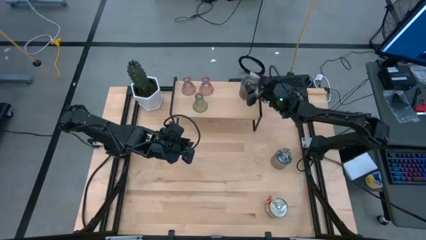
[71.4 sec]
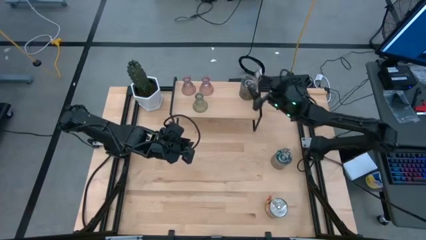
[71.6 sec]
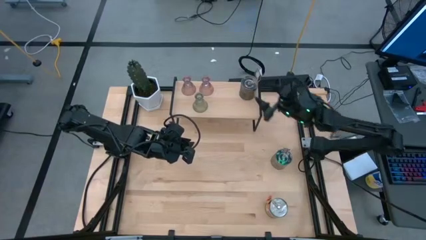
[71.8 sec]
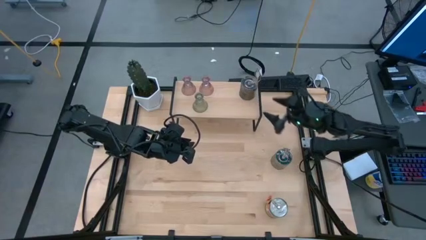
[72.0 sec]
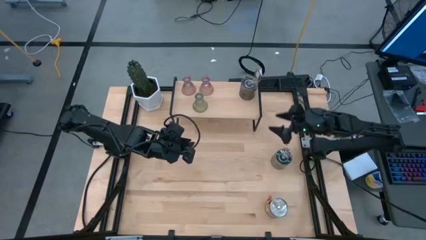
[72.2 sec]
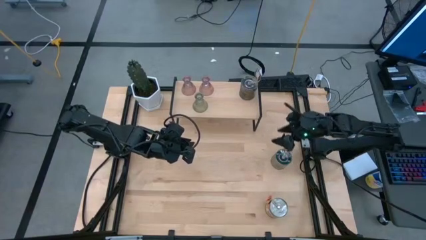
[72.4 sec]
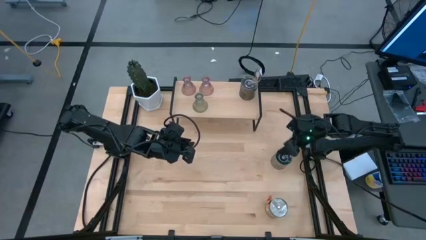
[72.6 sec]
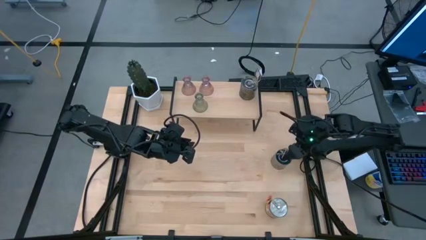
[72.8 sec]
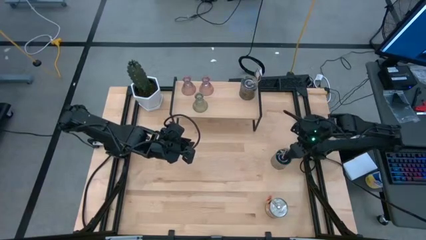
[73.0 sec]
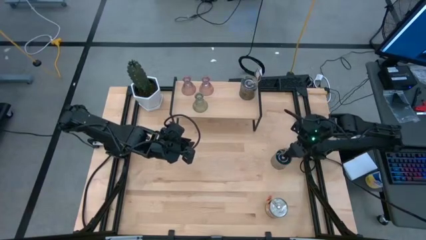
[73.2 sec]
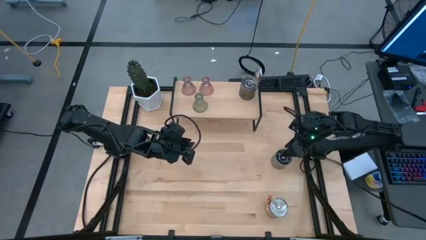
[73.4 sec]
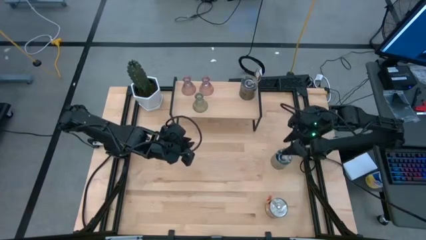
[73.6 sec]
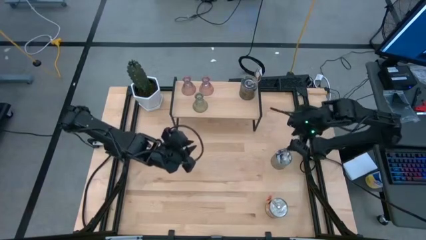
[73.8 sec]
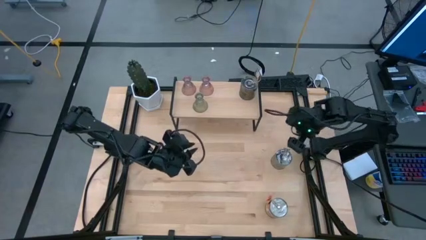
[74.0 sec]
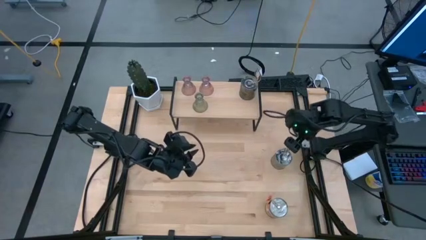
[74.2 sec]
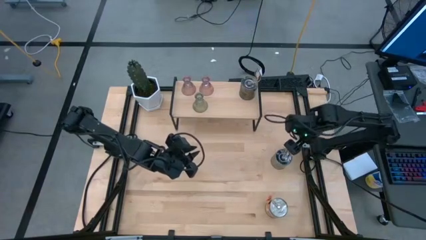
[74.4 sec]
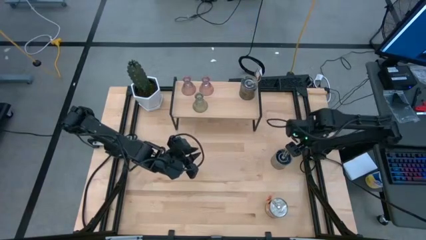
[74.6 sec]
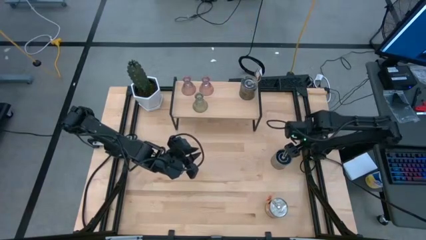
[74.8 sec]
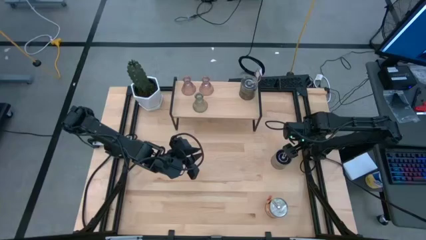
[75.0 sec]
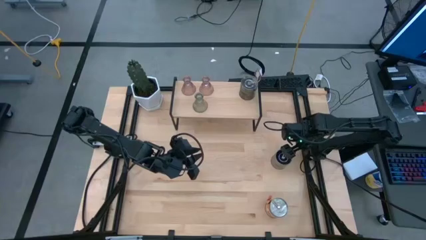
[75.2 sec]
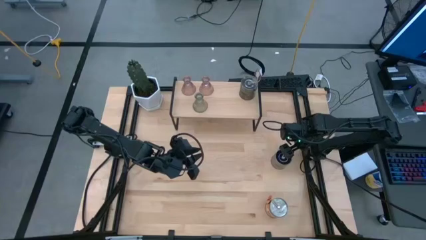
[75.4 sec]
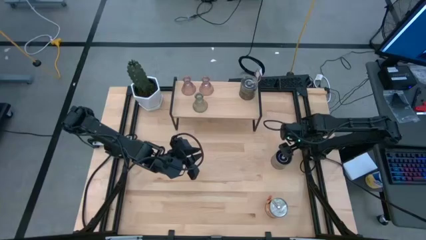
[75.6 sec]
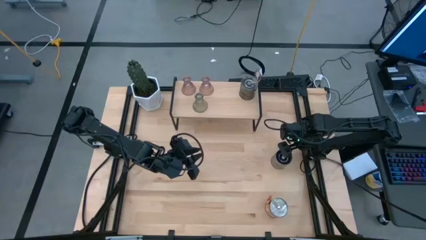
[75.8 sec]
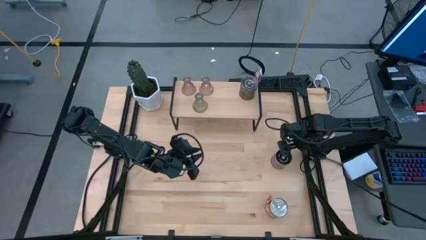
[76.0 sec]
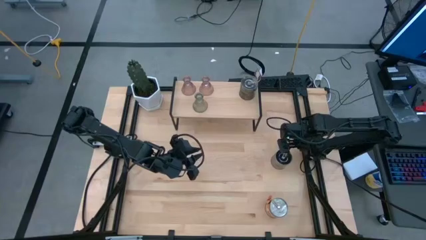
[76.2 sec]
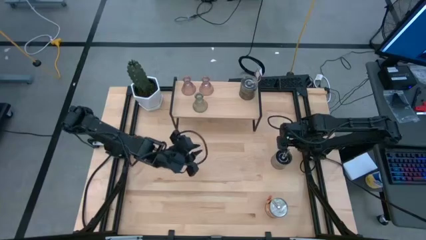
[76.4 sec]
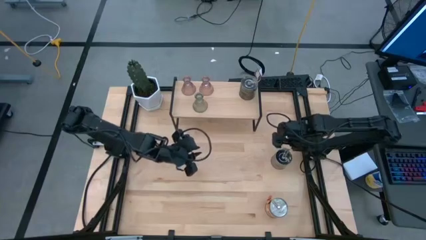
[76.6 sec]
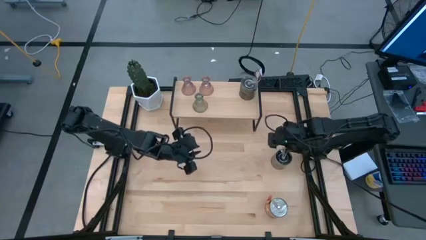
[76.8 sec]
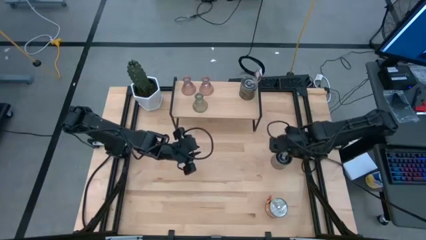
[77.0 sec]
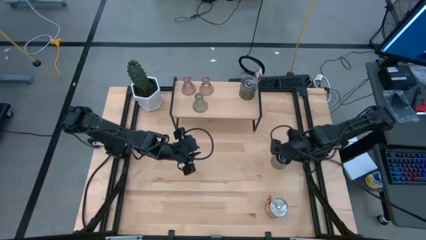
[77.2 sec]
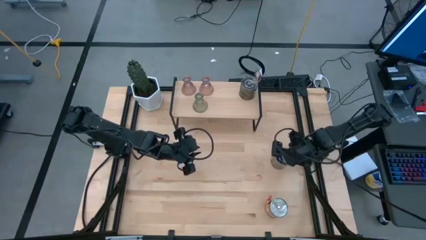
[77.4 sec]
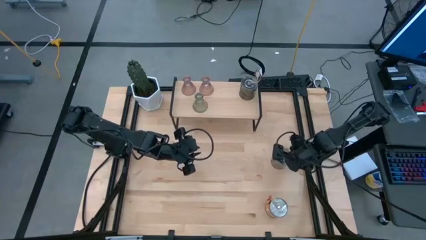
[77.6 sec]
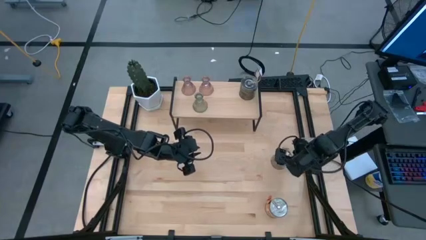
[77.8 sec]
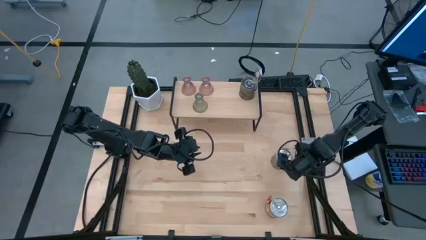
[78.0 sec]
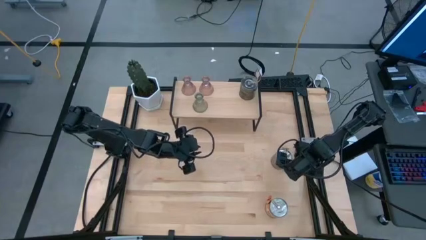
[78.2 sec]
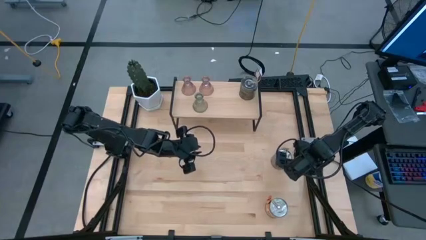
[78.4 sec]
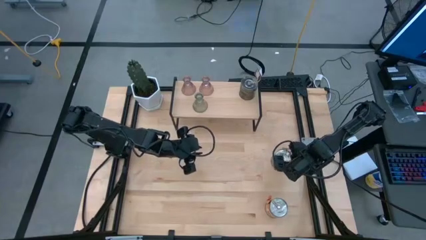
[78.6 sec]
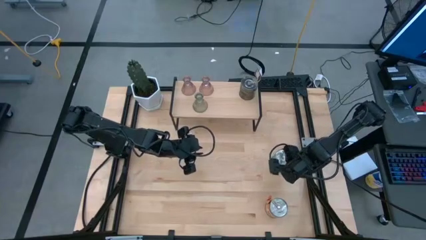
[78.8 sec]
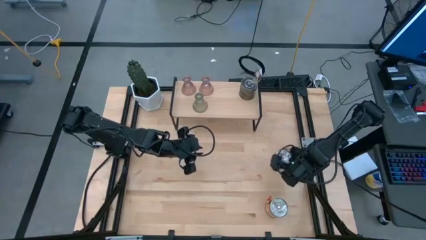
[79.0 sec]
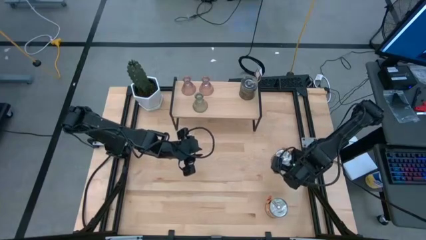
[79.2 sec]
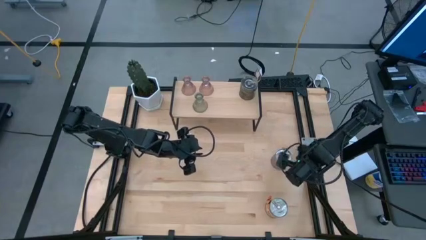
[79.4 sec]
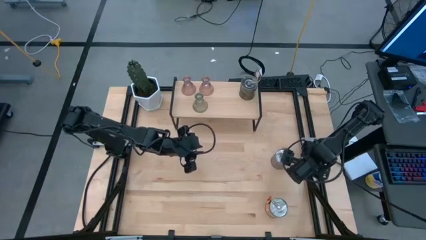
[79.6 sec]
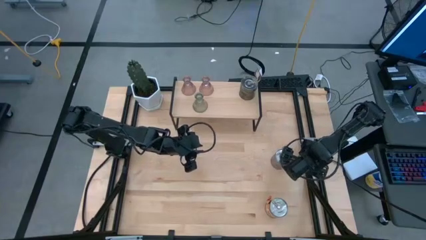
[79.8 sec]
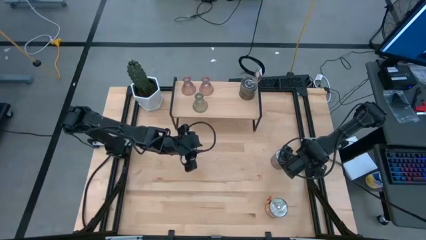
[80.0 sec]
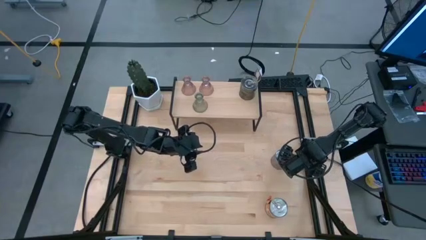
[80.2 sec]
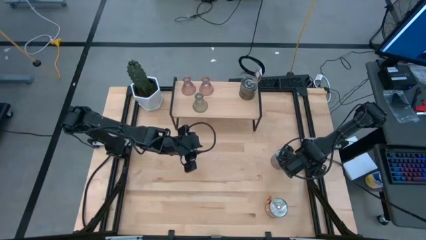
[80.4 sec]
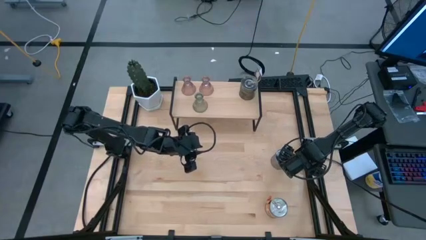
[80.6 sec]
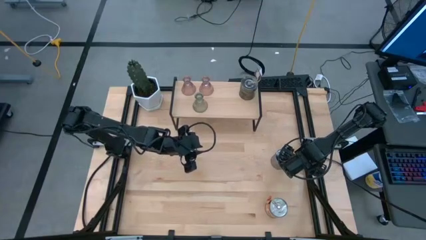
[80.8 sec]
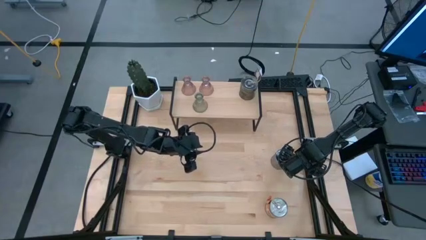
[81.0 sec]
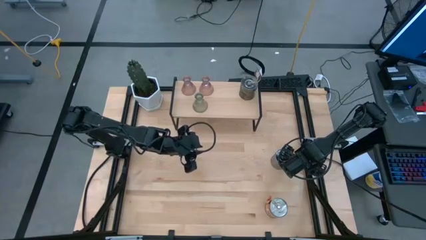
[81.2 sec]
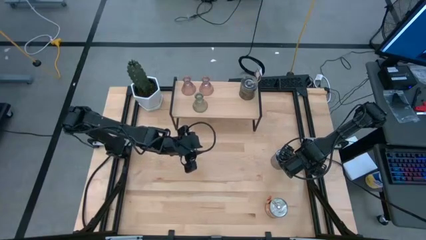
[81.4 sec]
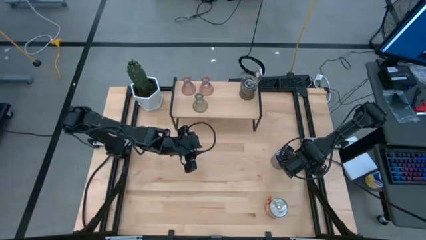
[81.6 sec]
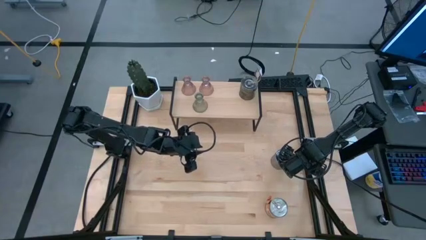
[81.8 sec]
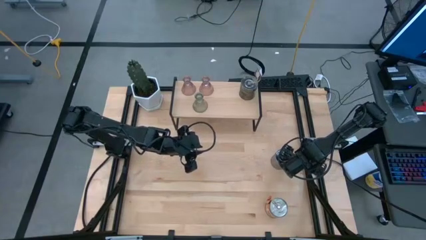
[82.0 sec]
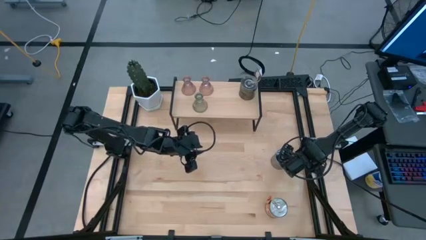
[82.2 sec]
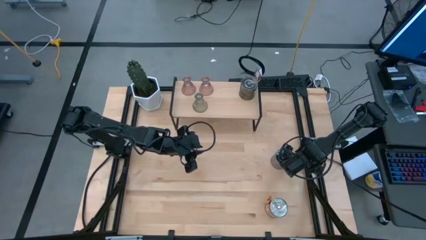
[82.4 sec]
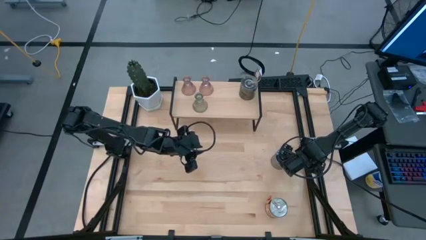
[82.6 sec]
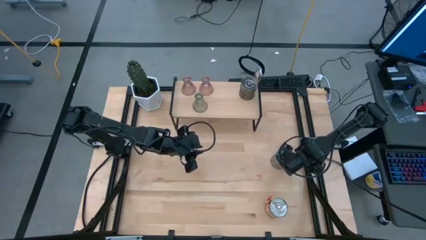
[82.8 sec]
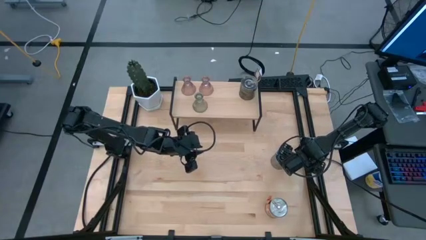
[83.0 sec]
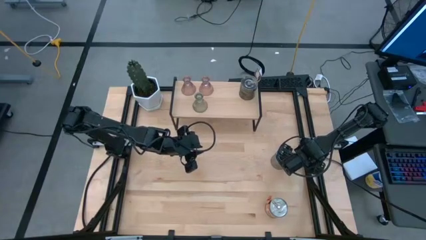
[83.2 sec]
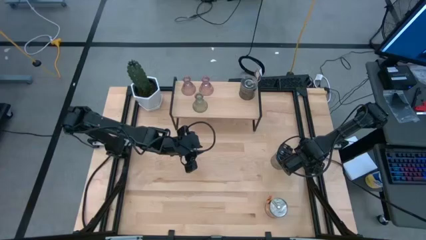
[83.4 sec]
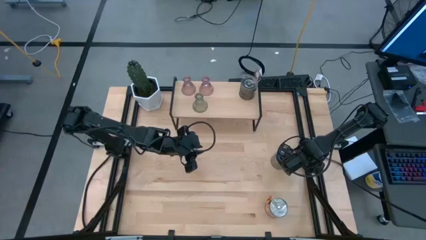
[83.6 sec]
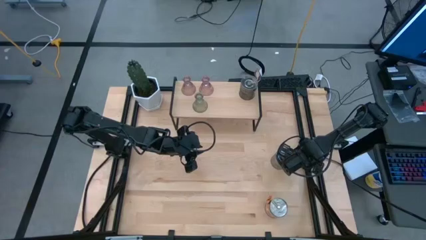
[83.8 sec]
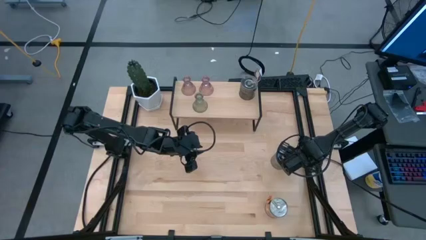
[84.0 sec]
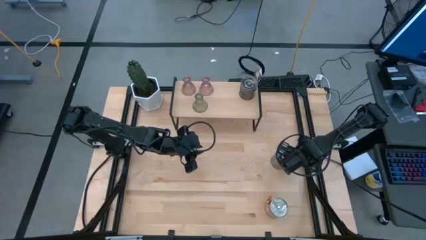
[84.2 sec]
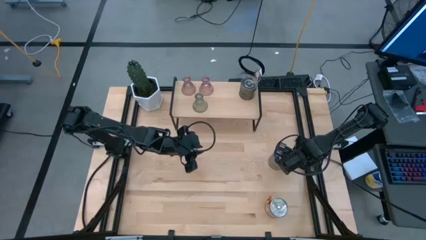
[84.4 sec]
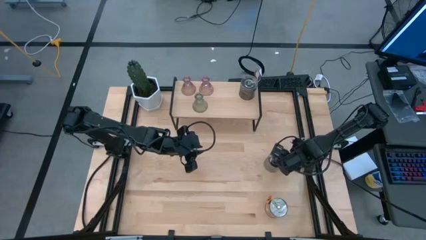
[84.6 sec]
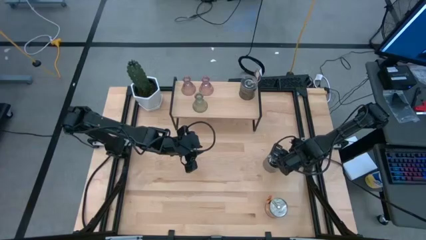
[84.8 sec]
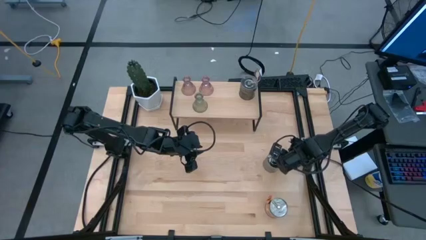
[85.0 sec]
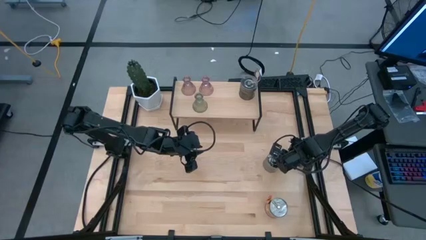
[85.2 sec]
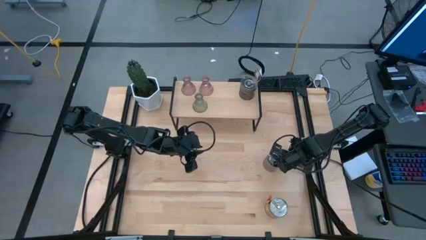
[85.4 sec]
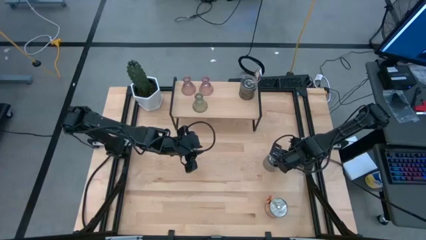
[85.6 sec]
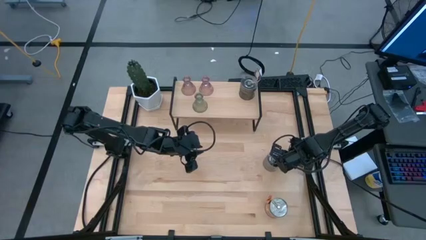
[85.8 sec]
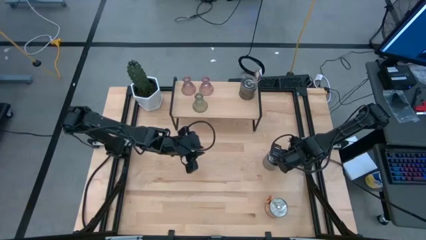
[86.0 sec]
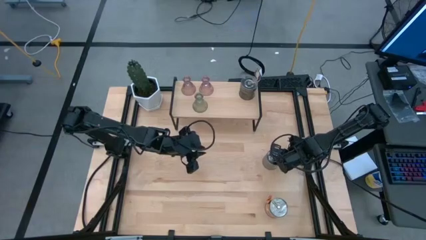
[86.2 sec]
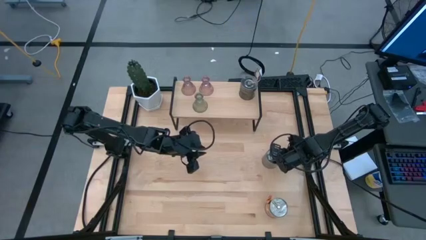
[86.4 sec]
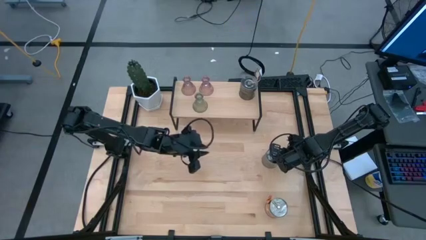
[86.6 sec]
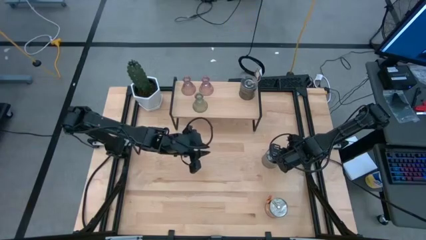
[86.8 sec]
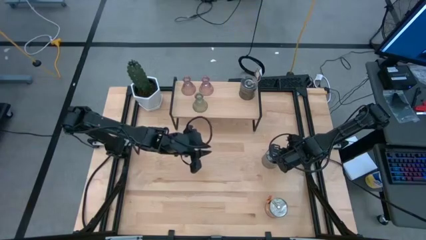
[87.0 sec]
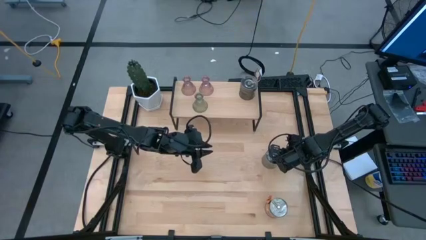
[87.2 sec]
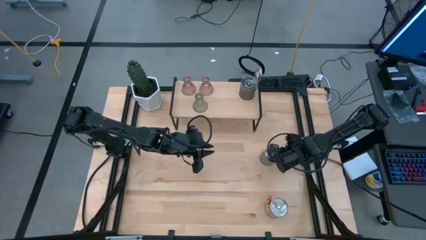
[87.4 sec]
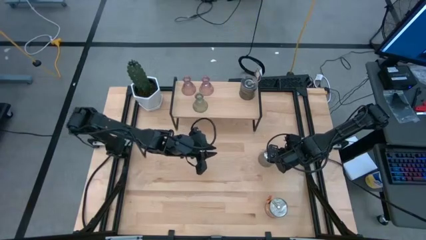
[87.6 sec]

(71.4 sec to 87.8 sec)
Task: Pick & Place candle stick holders
Put the top silver scented candle on the shelf
